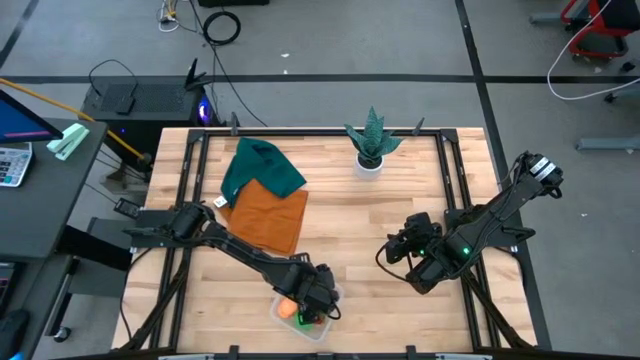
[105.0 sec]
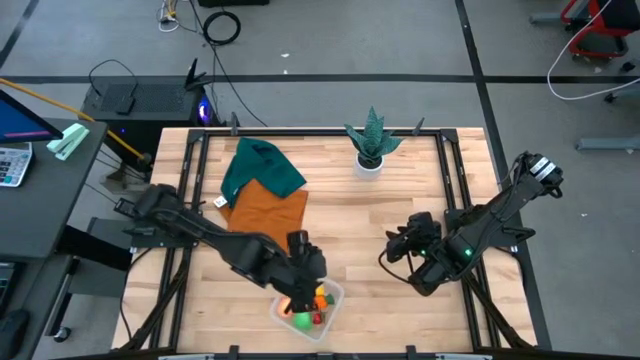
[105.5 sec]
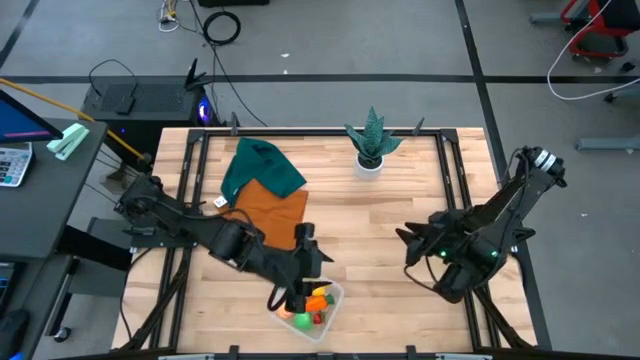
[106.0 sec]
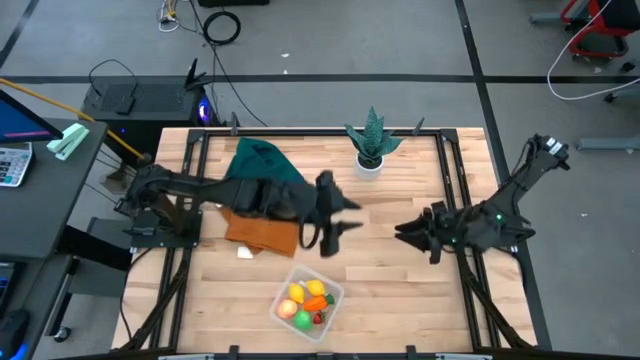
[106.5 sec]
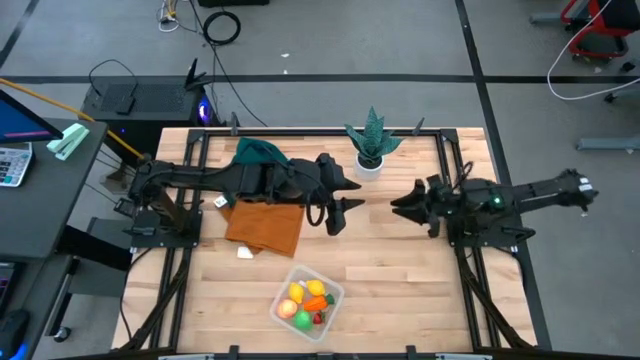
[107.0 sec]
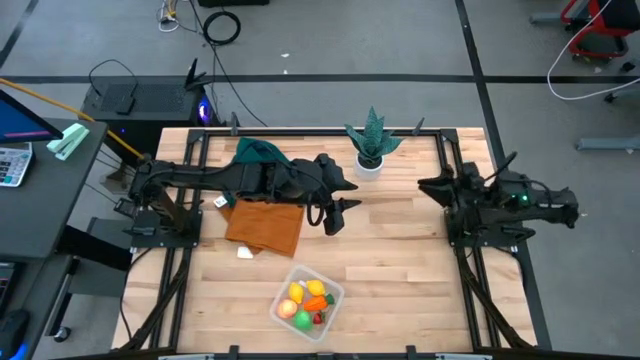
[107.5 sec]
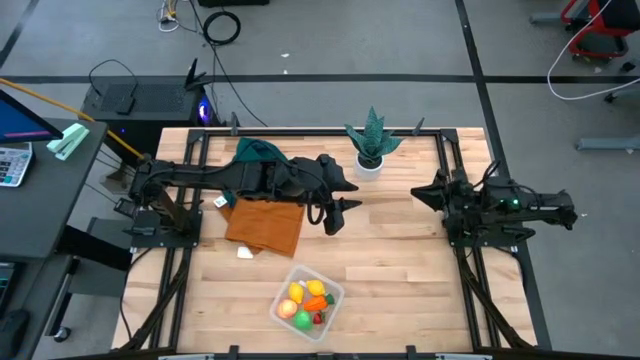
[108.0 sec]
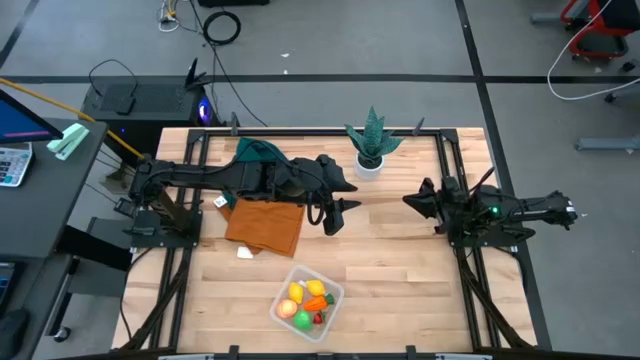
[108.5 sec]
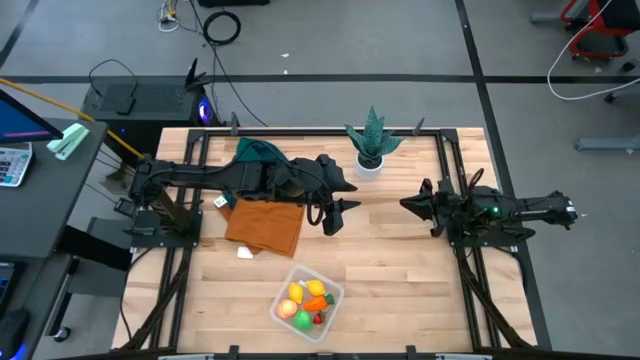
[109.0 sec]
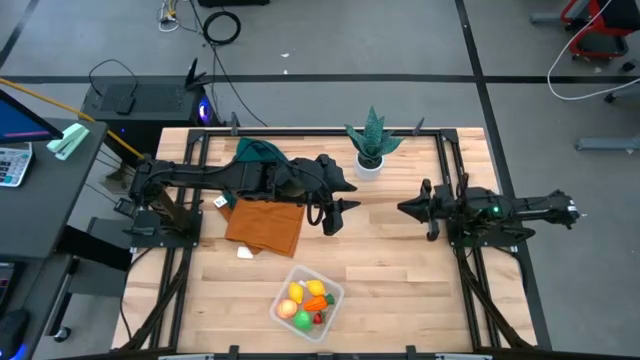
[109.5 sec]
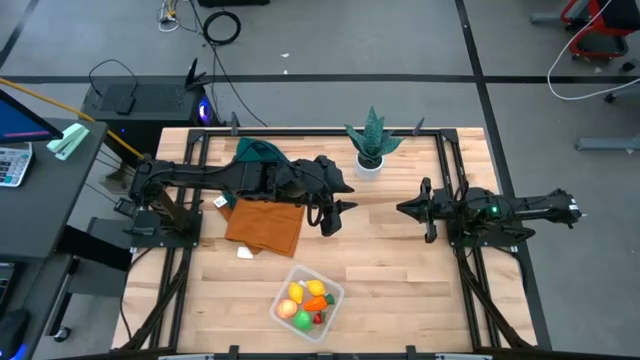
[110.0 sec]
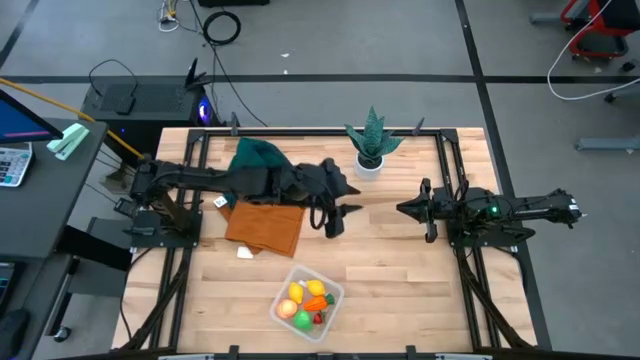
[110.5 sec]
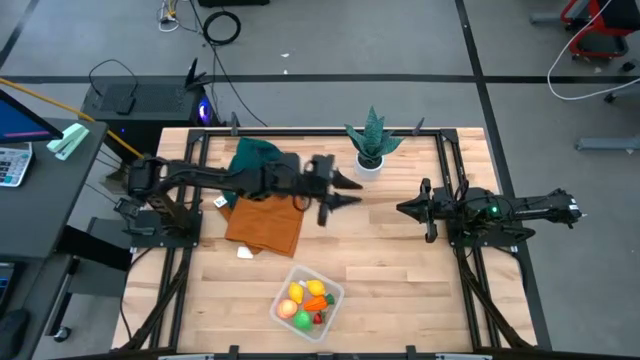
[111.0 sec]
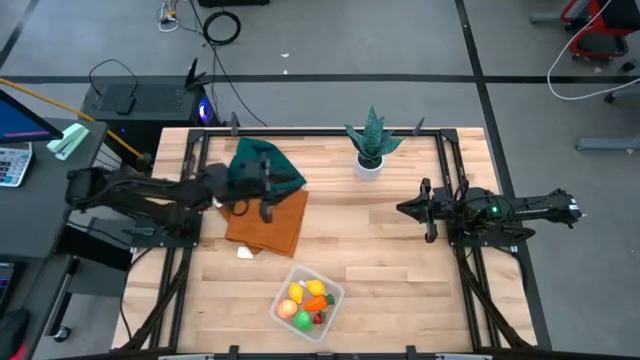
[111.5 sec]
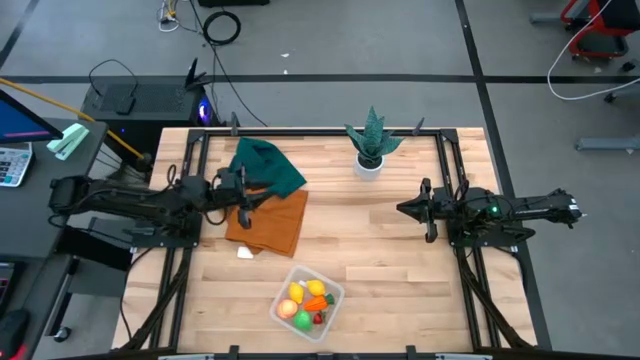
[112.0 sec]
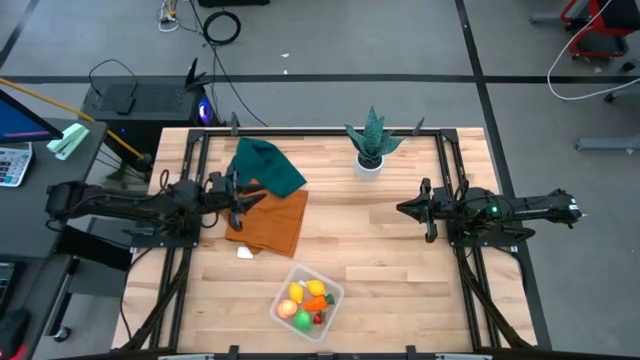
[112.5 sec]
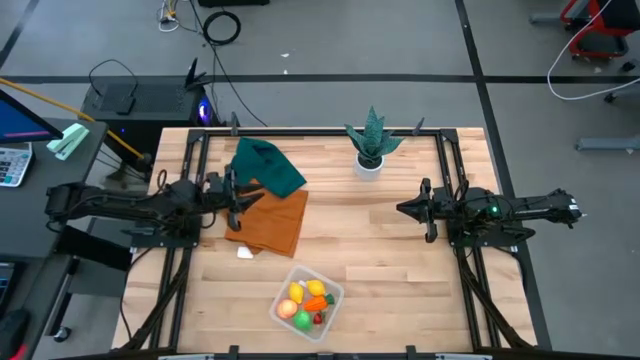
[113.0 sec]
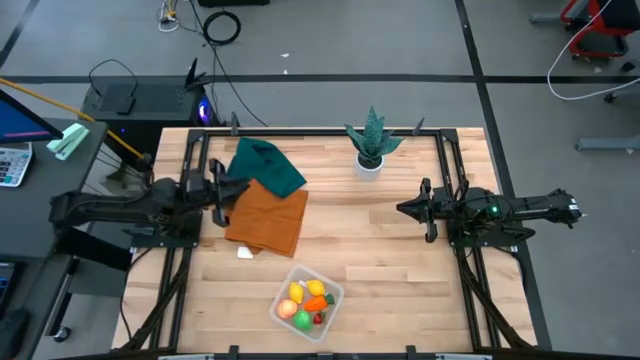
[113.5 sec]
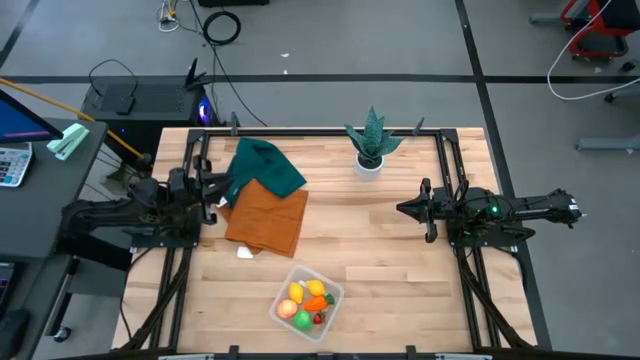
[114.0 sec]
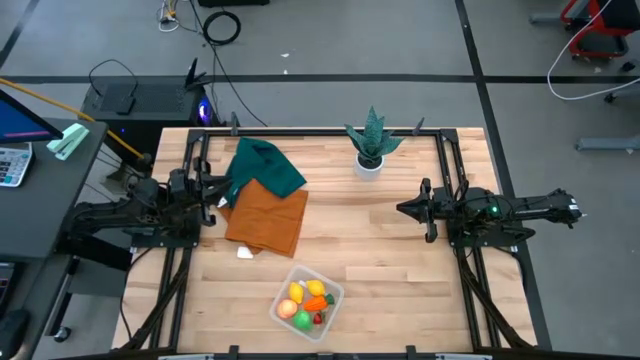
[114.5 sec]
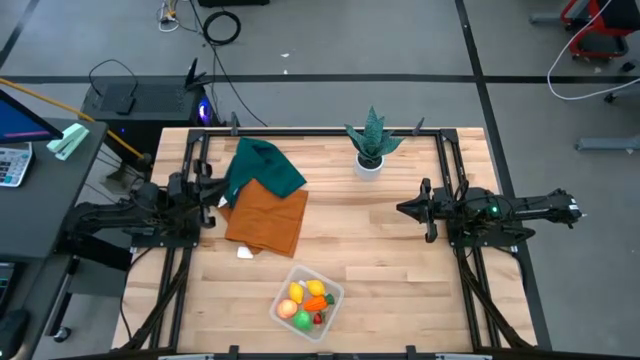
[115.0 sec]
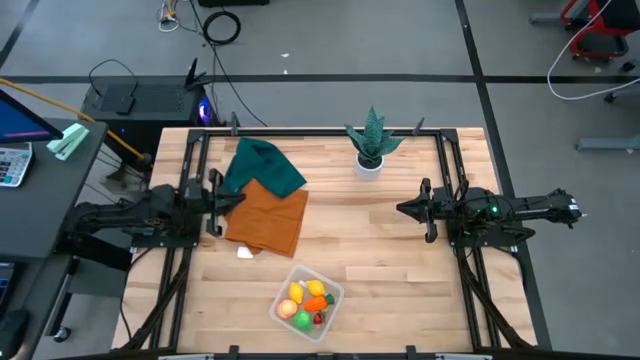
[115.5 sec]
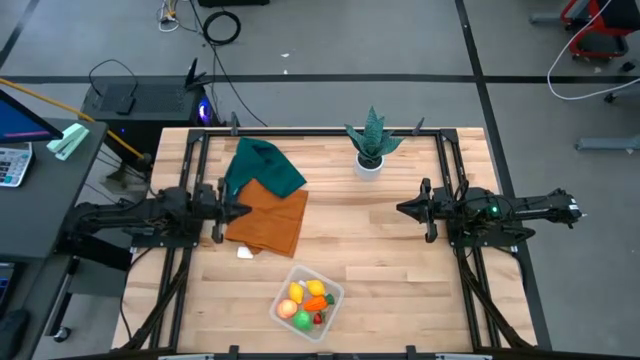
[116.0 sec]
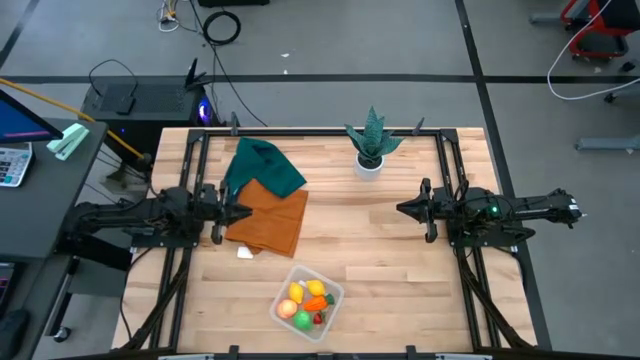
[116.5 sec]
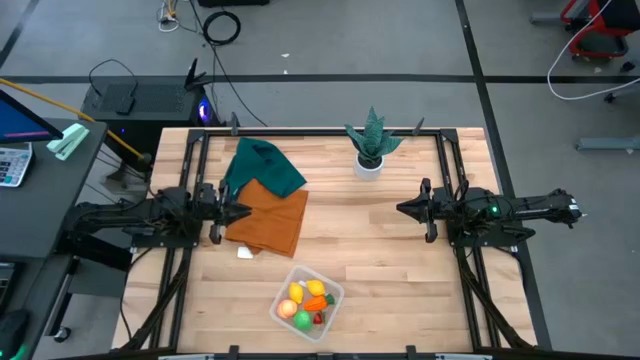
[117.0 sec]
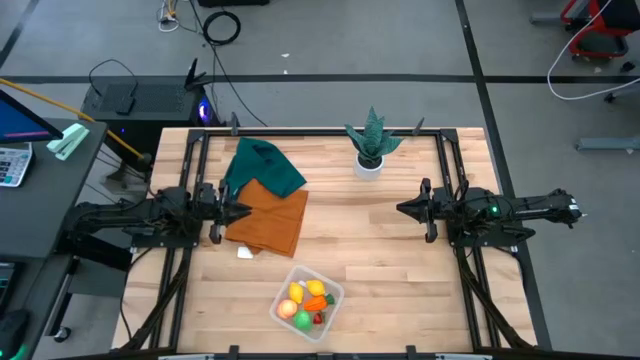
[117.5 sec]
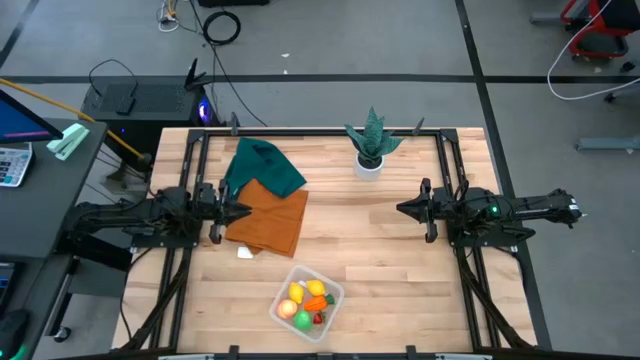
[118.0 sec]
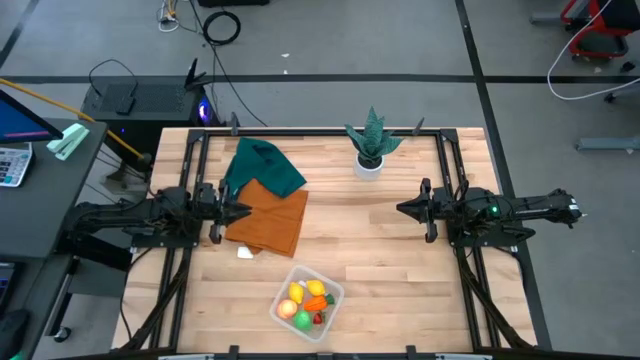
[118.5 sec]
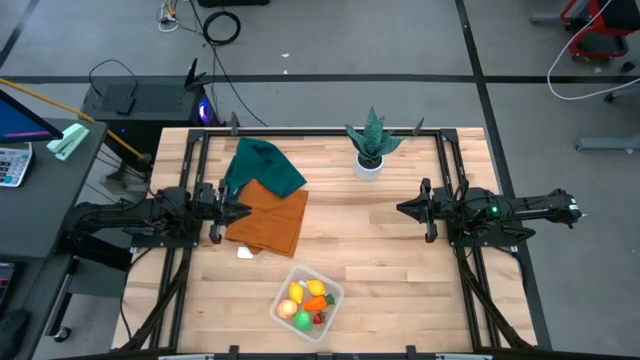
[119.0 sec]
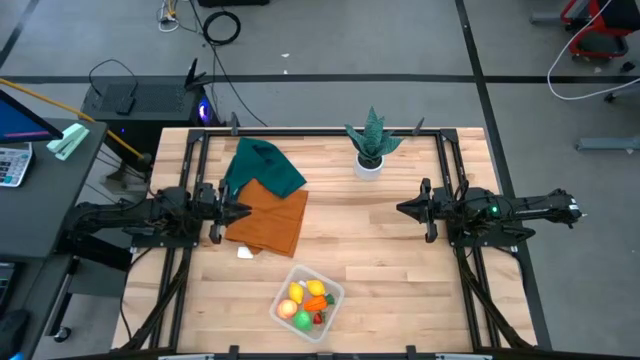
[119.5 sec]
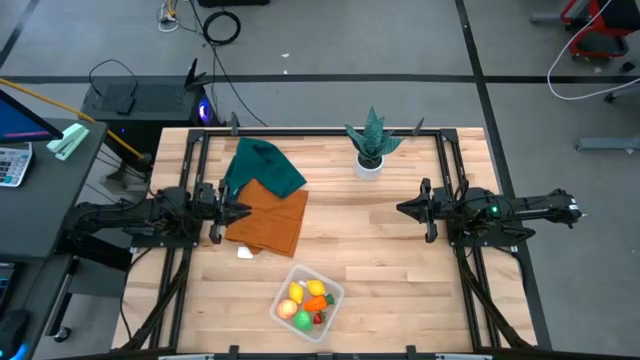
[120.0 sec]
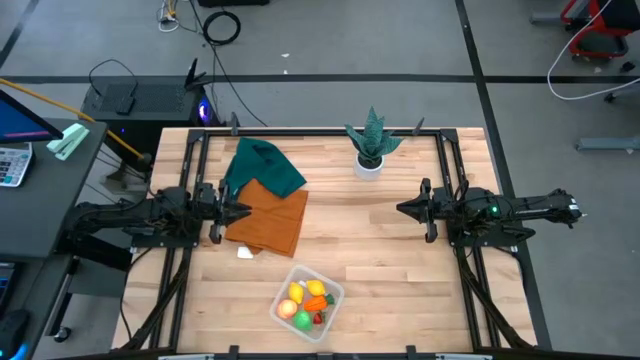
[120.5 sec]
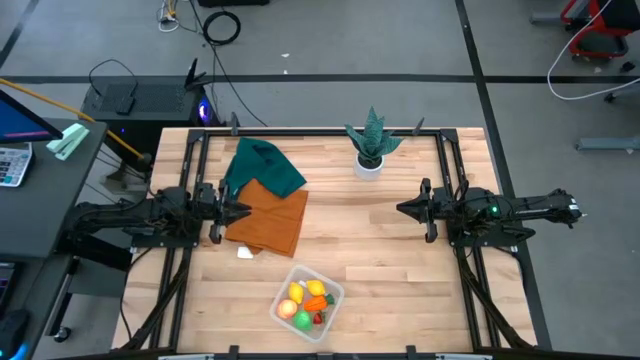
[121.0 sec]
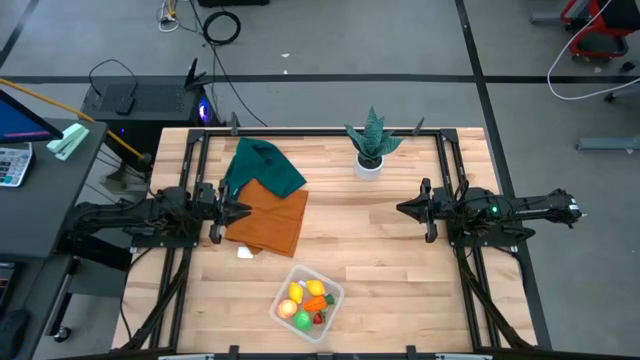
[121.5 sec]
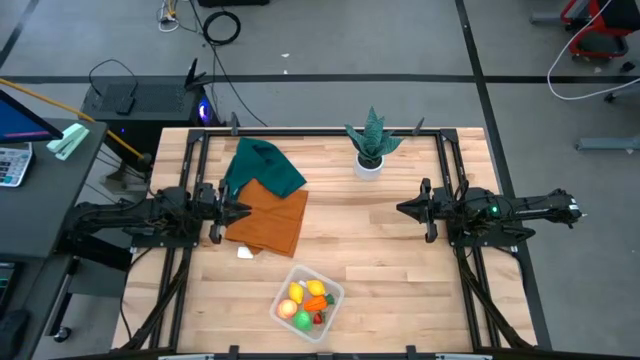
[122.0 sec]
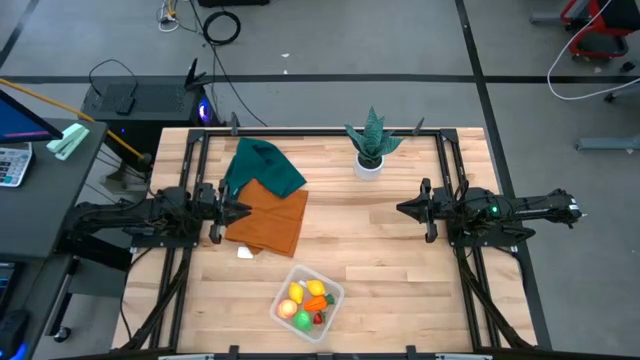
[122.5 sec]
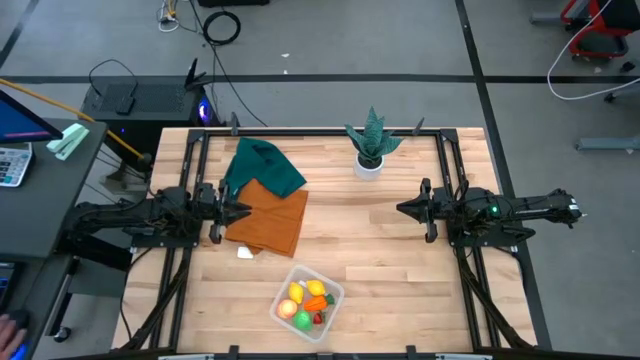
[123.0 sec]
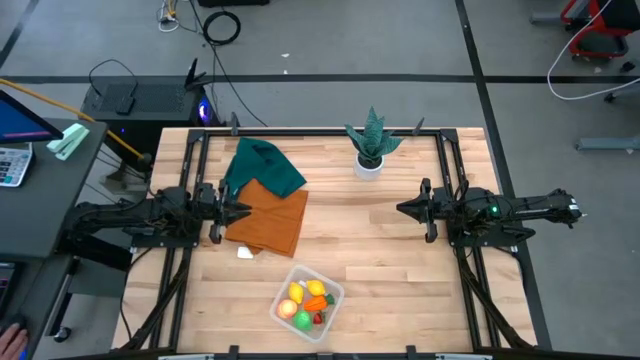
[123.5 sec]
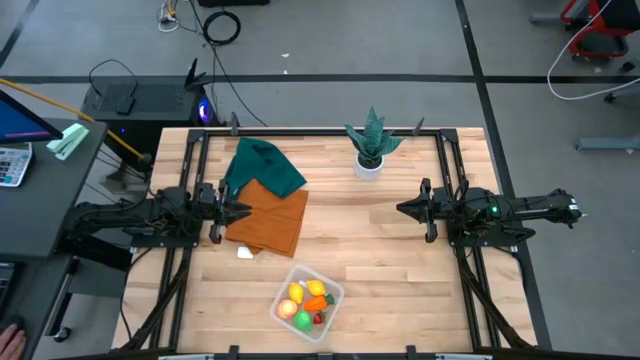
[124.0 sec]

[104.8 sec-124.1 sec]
Task: Pick and placing Produce into tupperware
Return to Home Position

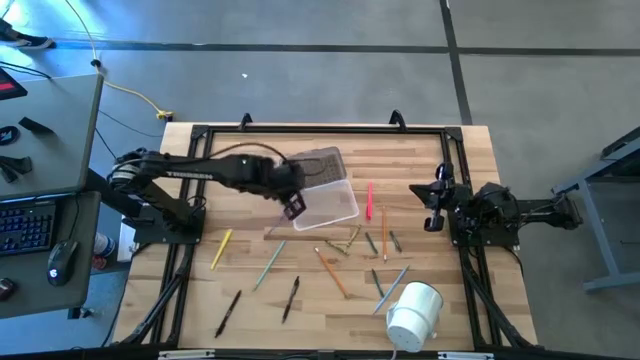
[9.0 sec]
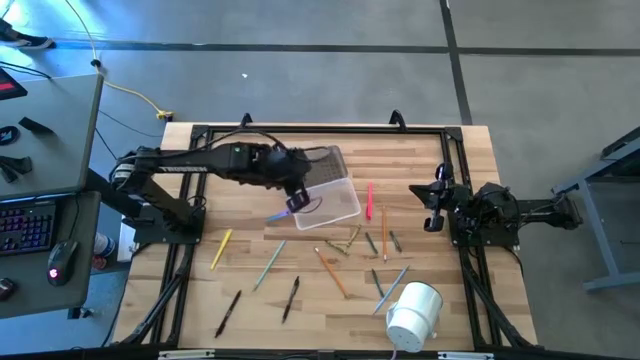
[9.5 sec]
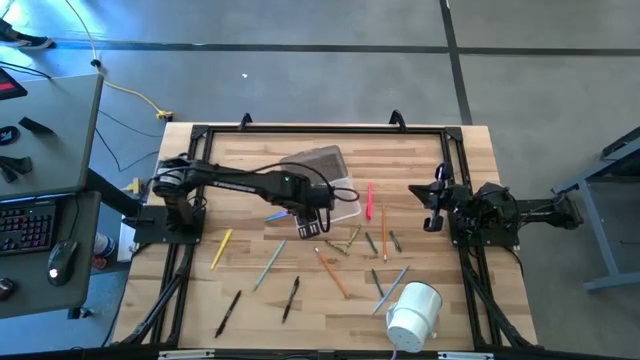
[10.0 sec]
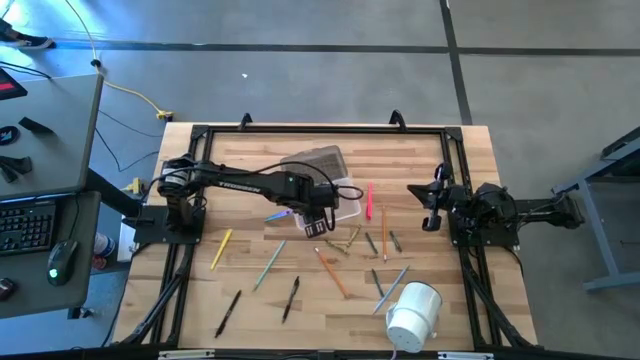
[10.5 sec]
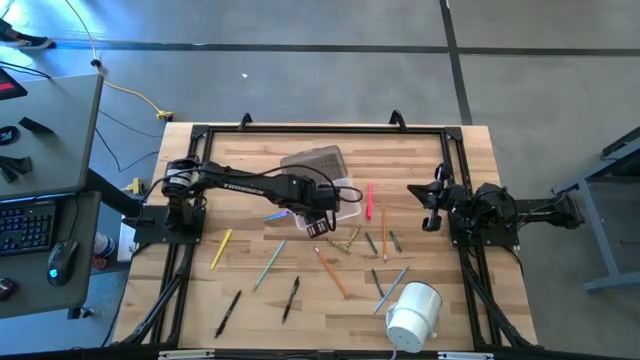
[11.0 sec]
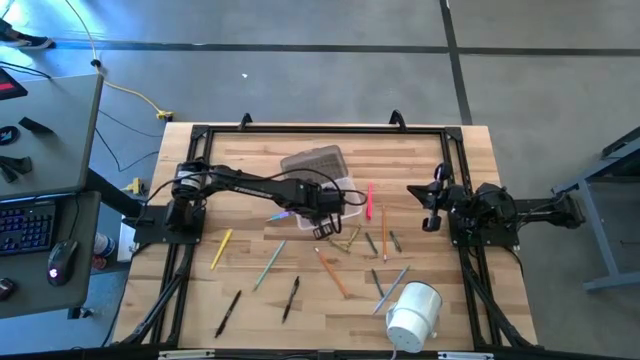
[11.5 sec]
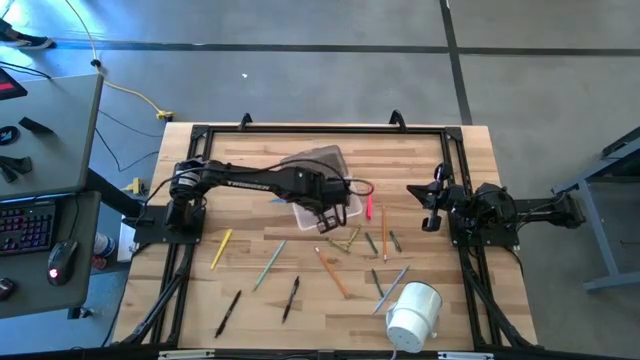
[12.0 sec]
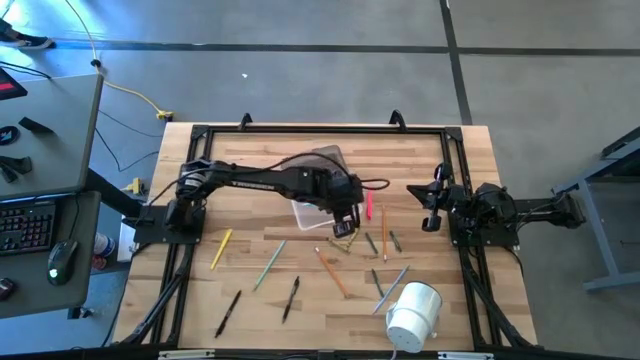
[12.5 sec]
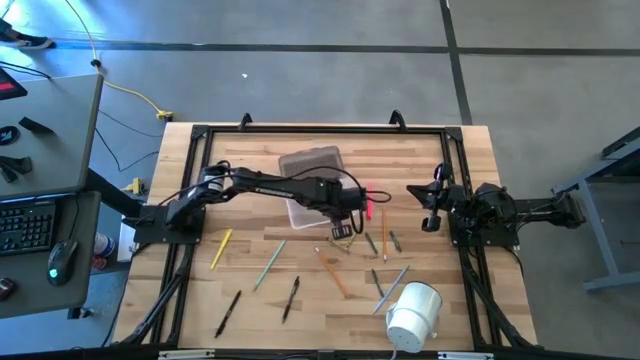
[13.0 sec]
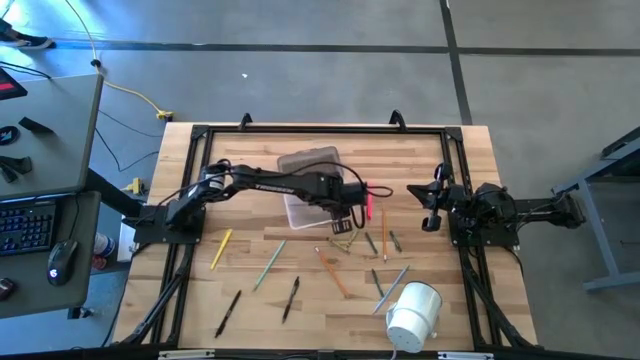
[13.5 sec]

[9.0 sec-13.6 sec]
Task: Pick & place school supplies into a supply box
Put the purple scissors into the supply box
